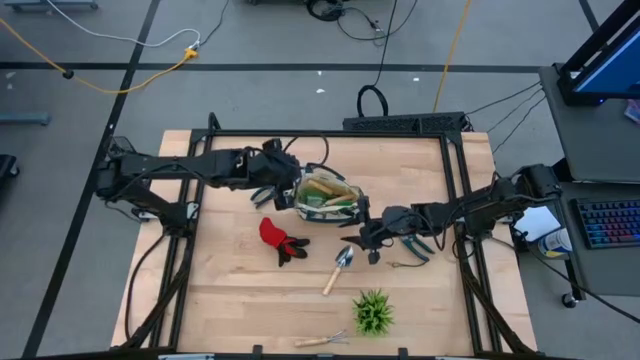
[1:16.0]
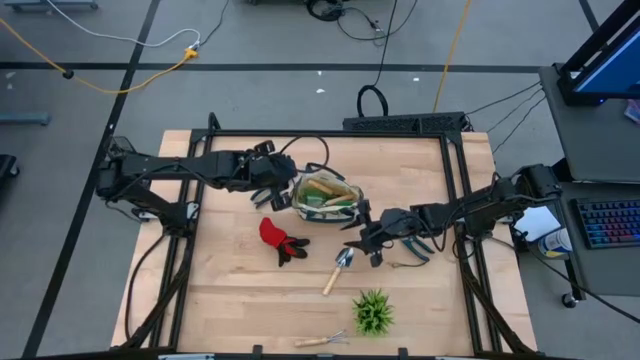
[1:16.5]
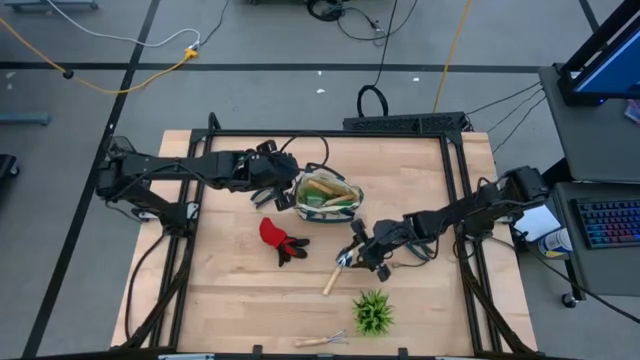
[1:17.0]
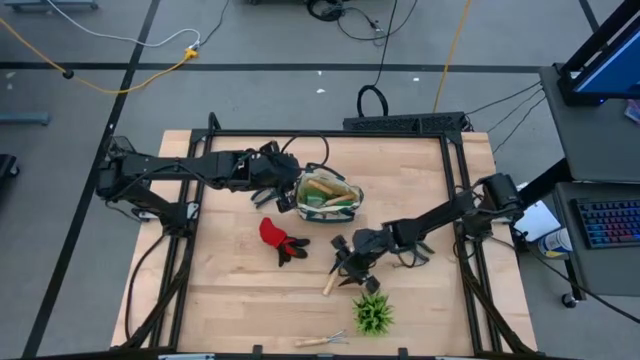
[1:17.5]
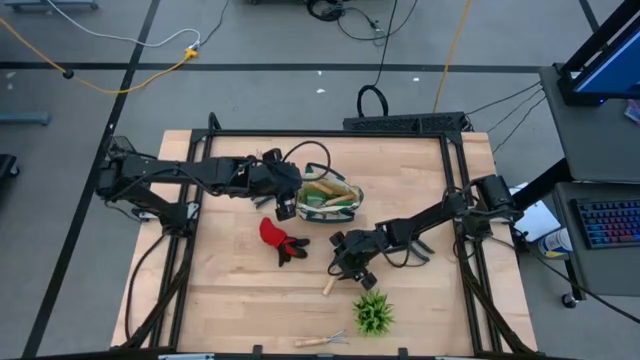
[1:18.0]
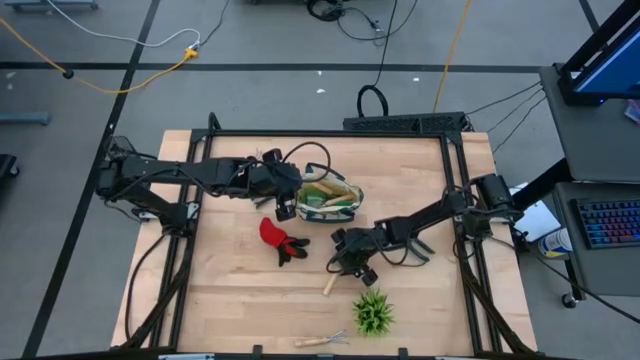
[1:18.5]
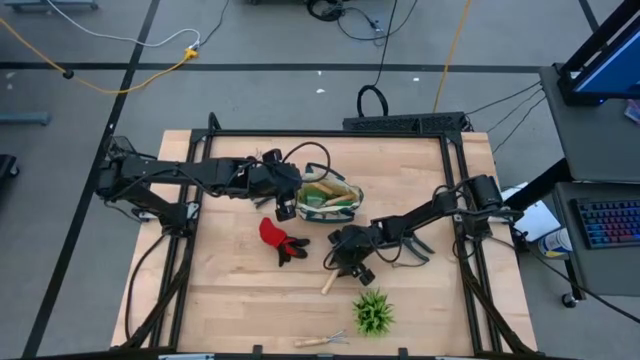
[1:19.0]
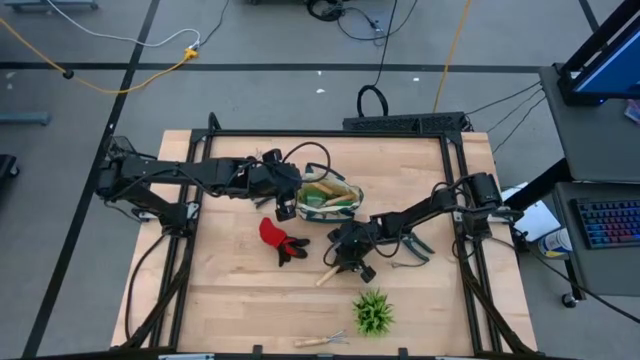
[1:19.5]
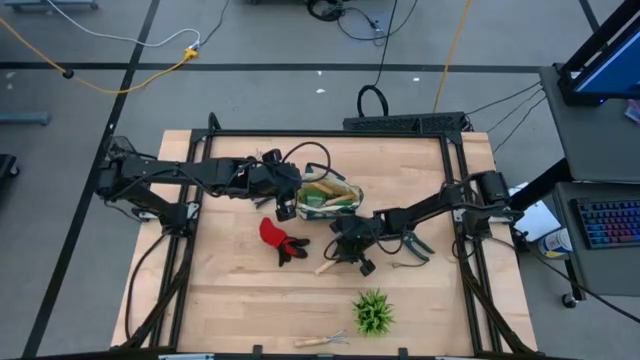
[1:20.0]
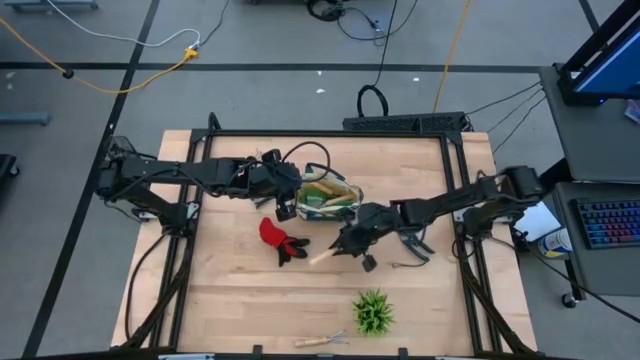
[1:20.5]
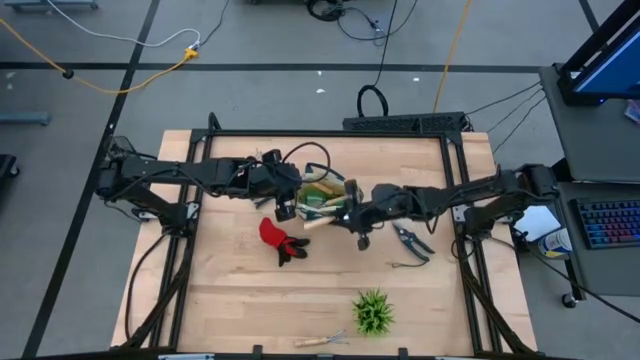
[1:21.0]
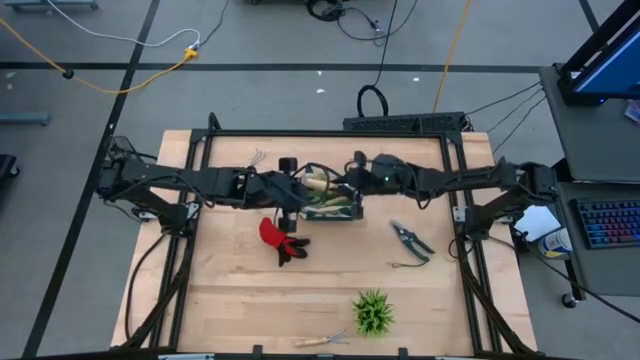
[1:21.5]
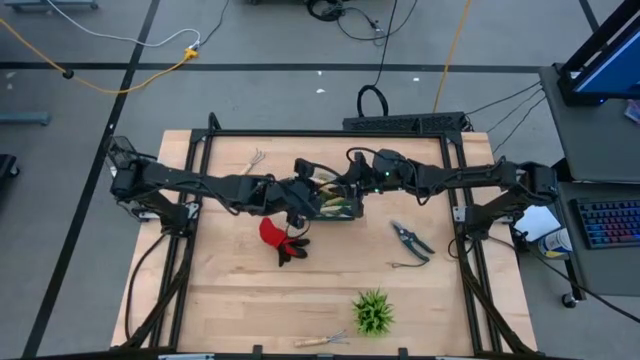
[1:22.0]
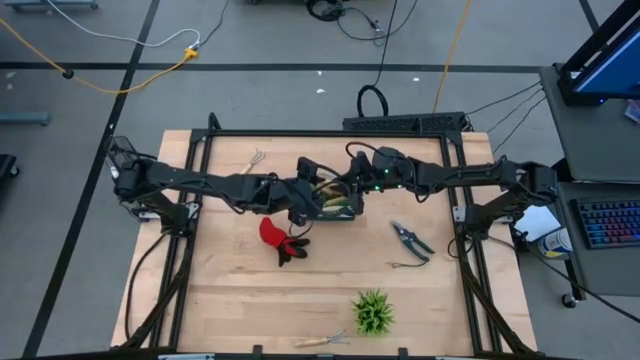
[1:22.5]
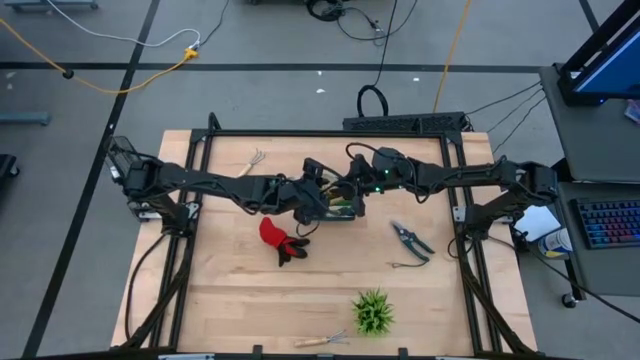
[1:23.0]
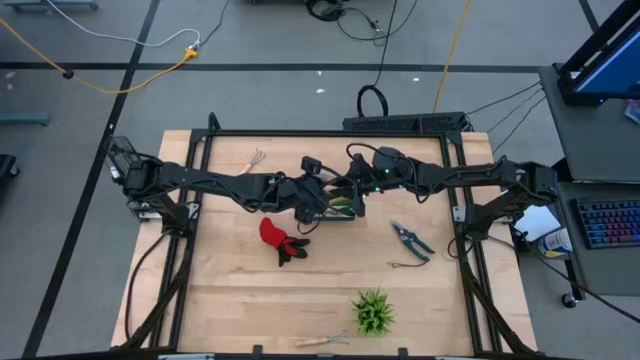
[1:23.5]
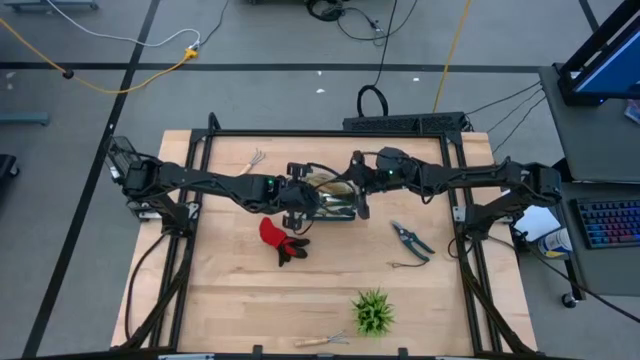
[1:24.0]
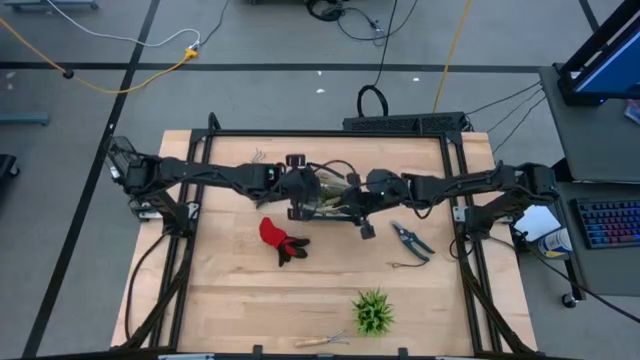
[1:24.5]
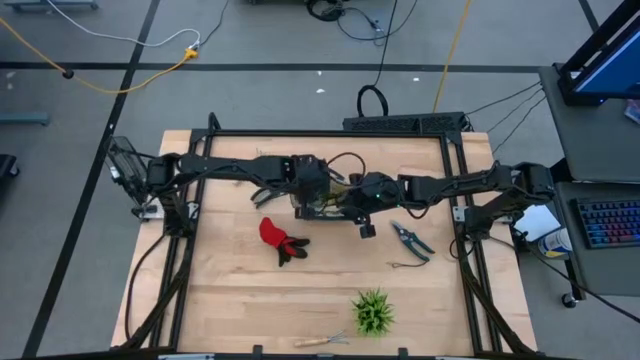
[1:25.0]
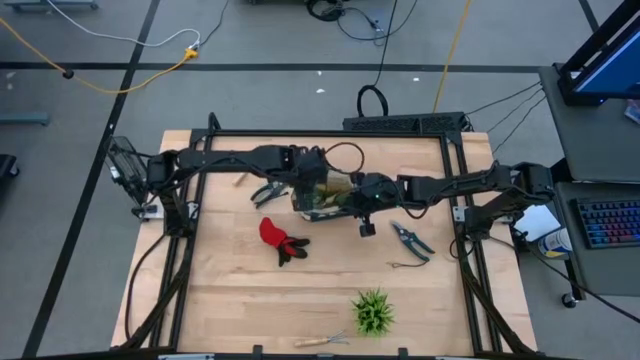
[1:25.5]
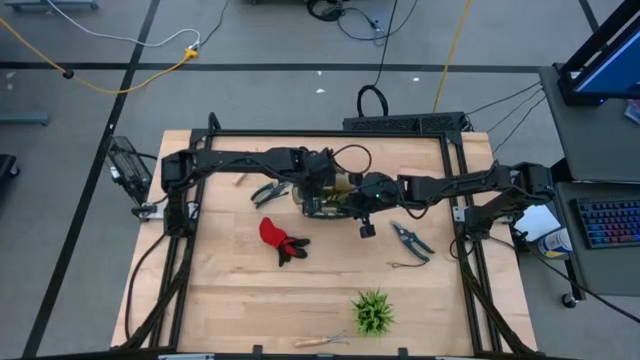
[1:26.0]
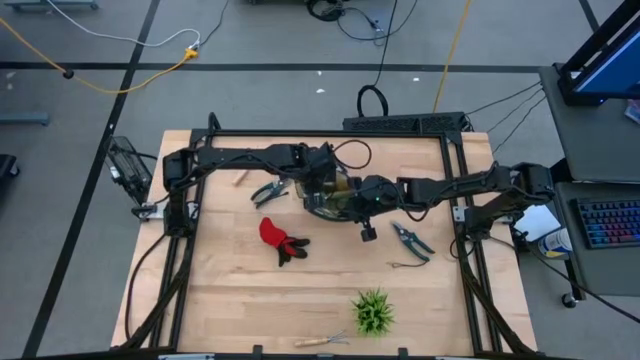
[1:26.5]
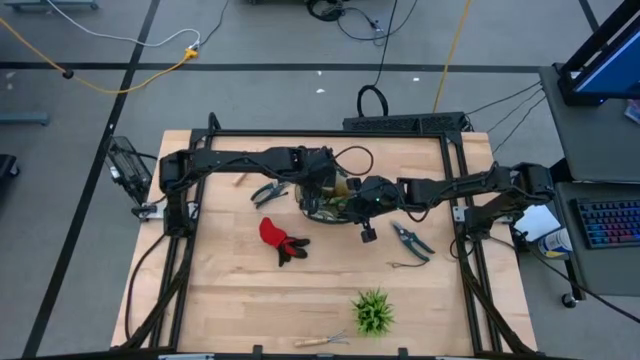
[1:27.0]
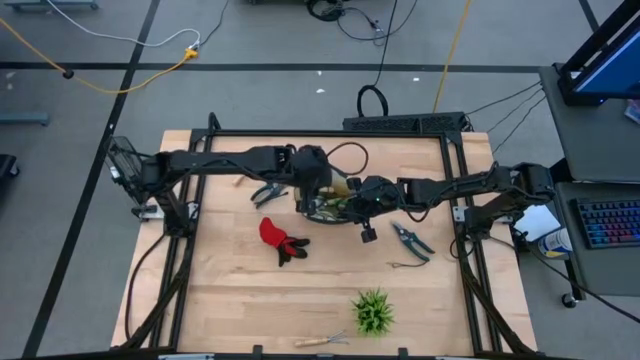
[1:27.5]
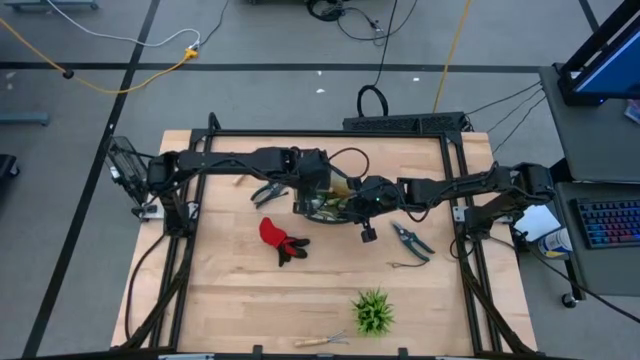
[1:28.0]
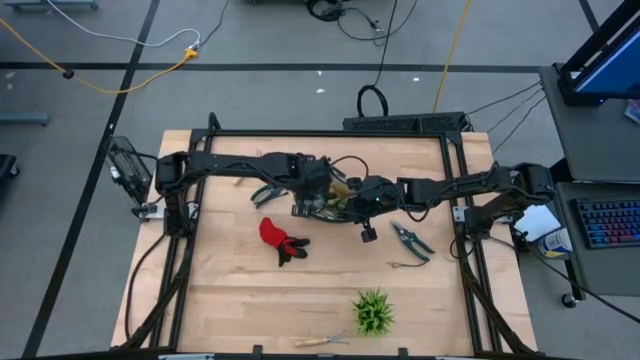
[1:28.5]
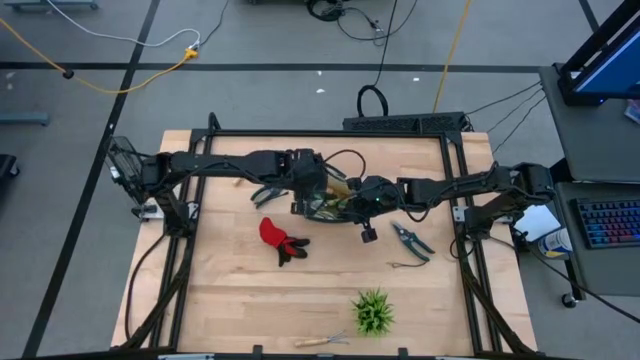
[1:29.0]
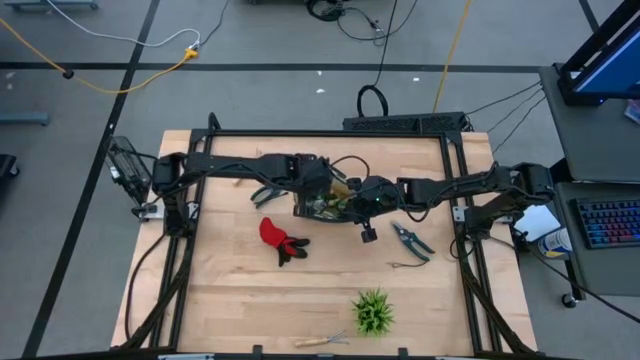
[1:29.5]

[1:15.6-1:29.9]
Task: Pick & Place Garden tools in Gardening bag
Put the brown trowel into the gardening bag

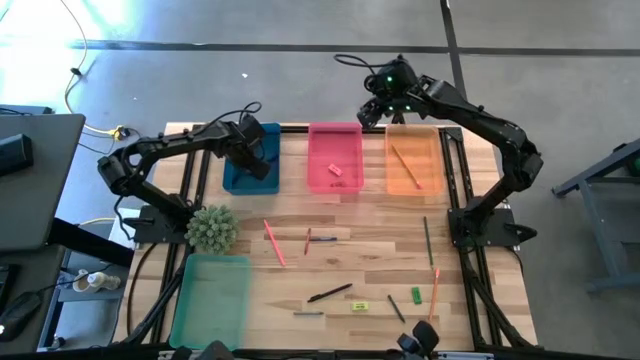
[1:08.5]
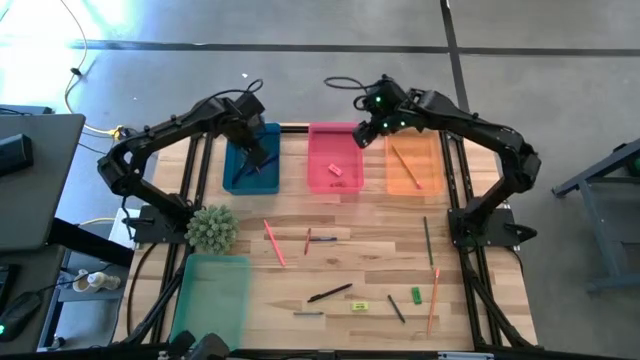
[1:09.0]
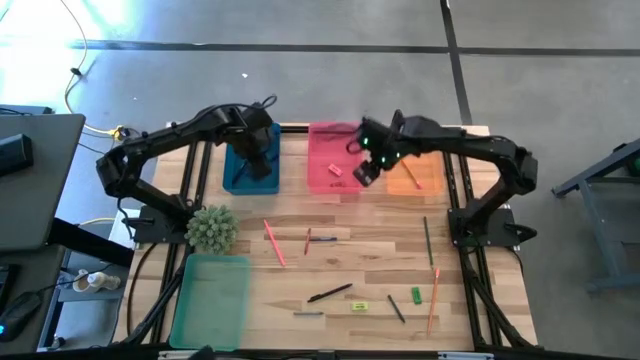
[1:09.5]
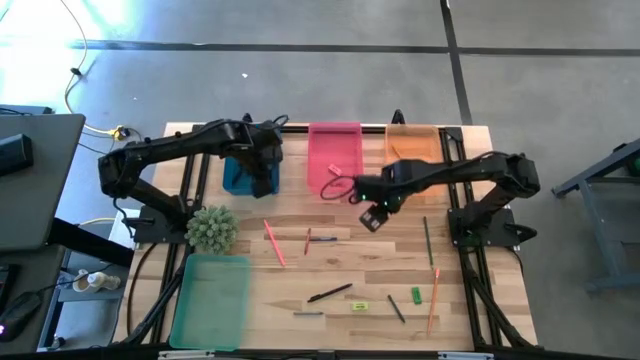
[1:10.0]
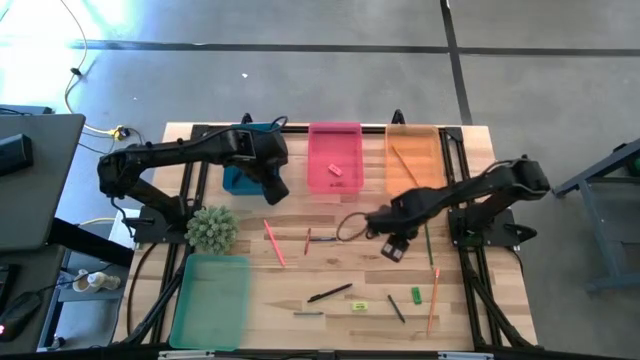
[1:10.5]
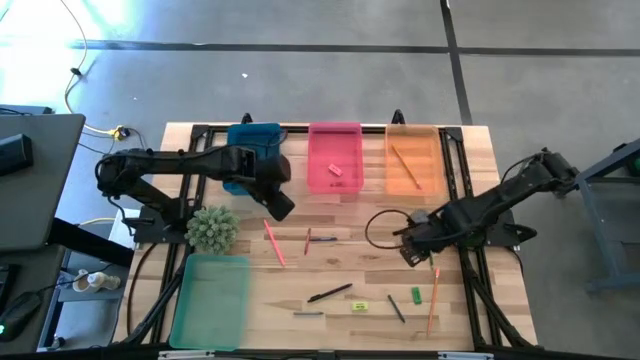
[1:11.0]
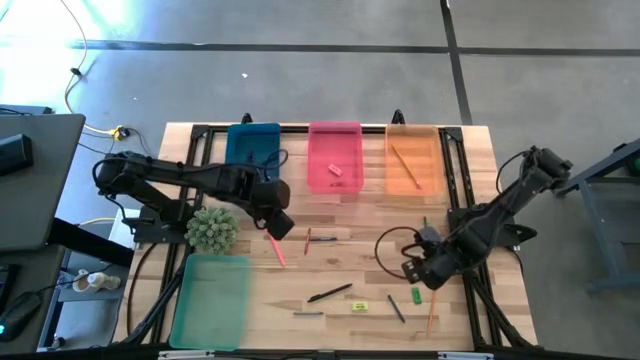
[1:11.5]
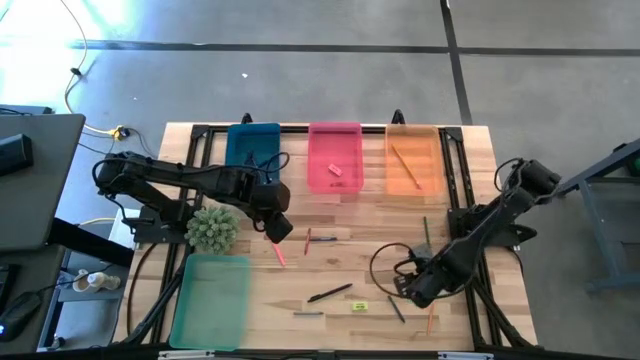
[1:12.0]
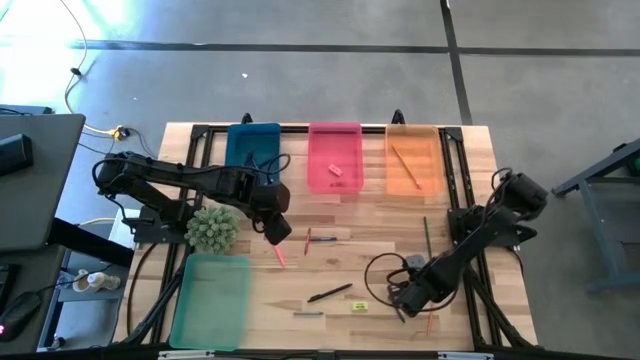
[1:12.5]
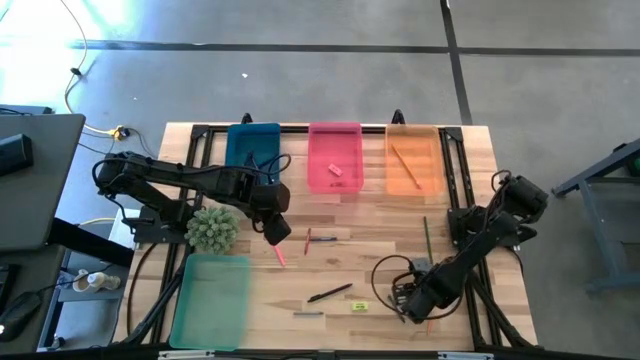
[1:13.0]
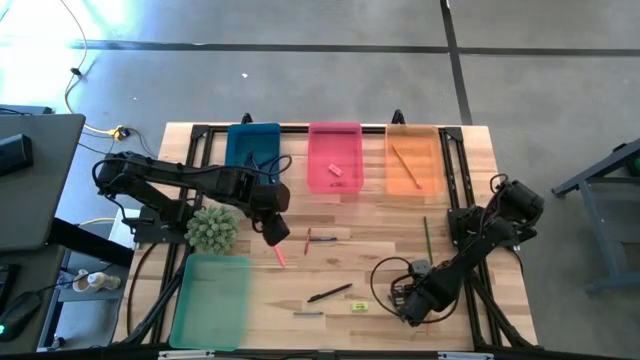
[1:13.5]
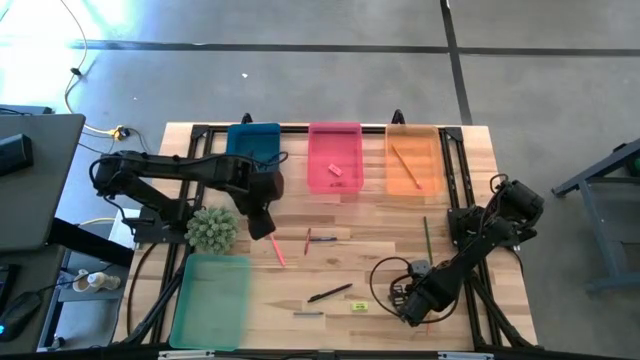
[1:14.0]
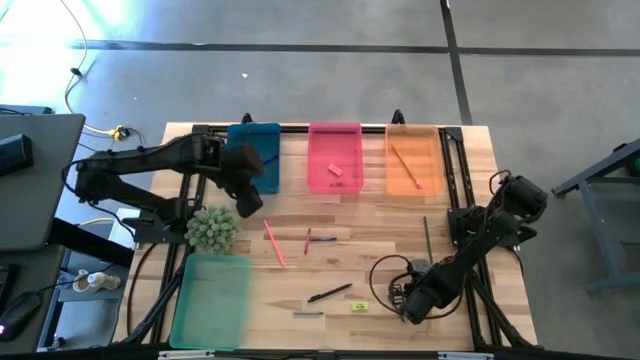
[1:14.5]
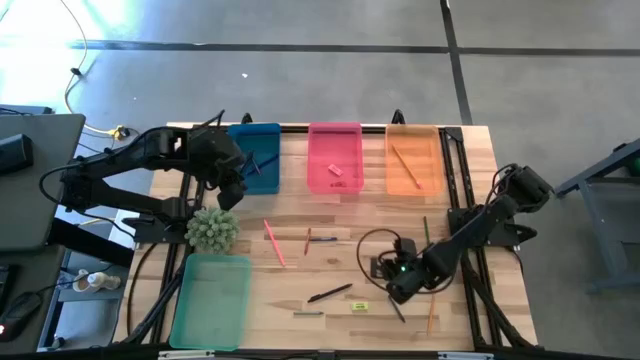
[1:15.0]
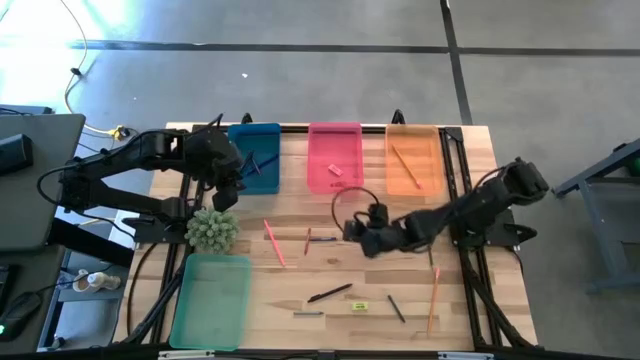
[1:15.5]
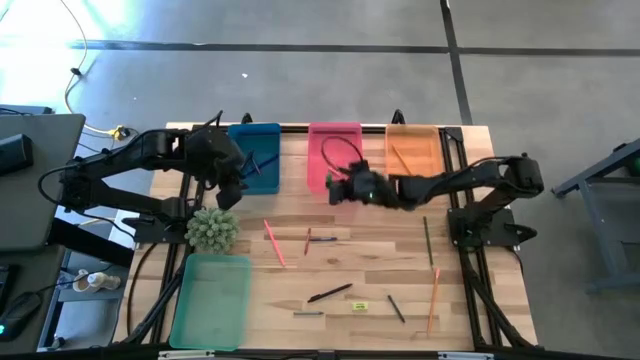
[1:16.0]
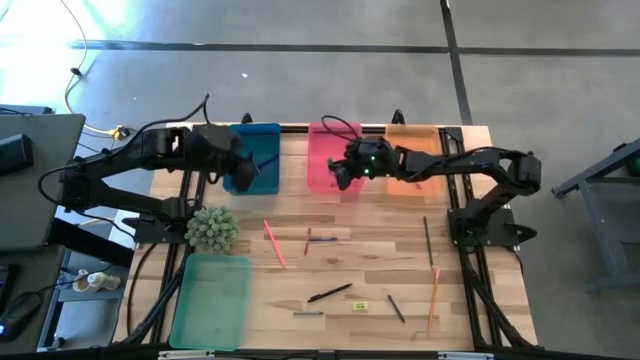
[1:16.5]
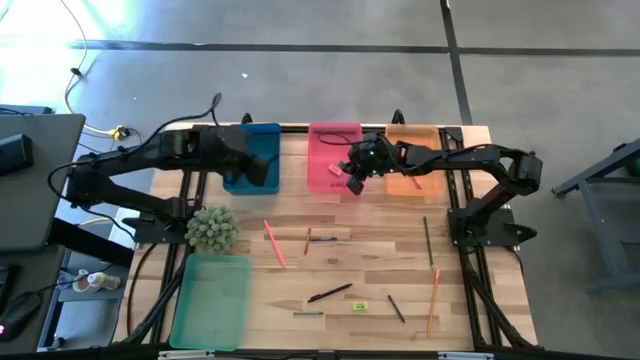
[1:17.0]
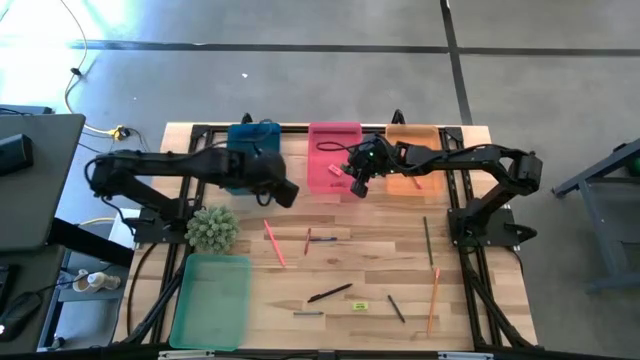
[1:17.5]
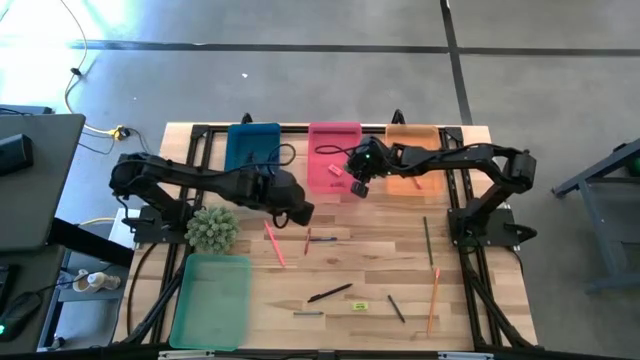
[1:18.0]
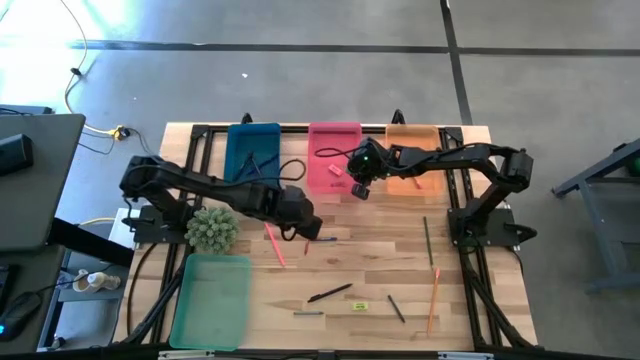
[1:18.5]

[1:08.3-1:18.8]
Task: Sort crayons/erasers/pens/pencils in bins
Put the green eraser into the pink bin
